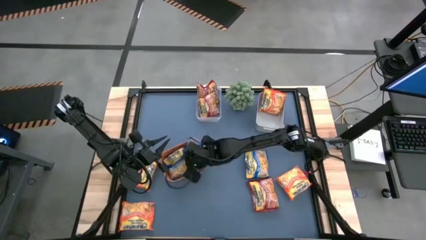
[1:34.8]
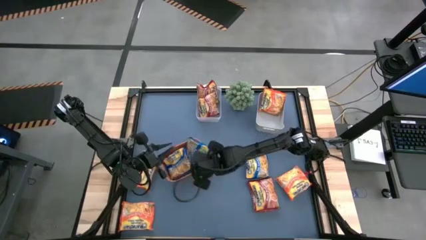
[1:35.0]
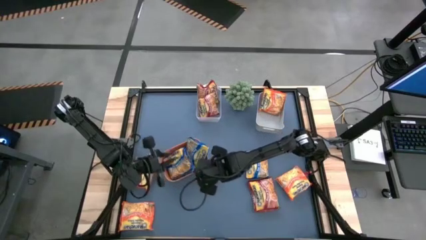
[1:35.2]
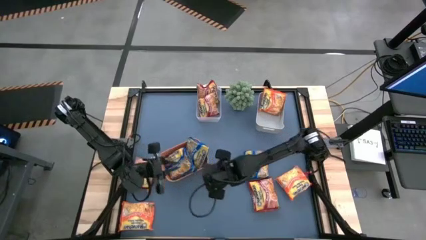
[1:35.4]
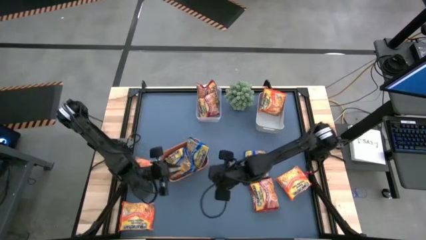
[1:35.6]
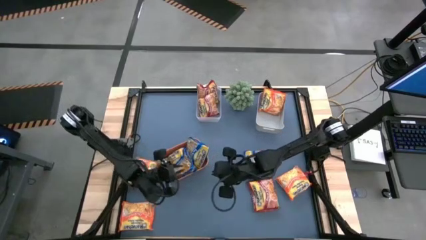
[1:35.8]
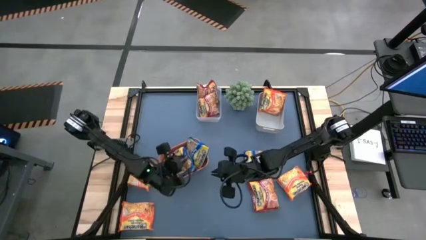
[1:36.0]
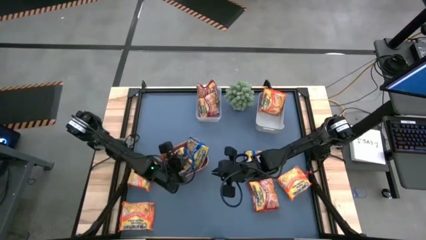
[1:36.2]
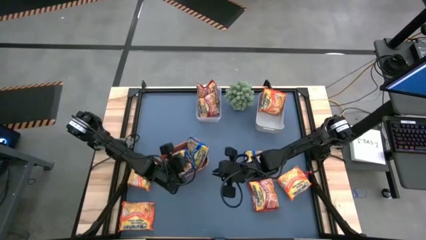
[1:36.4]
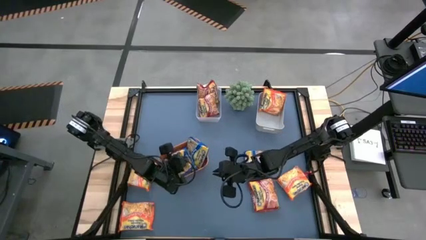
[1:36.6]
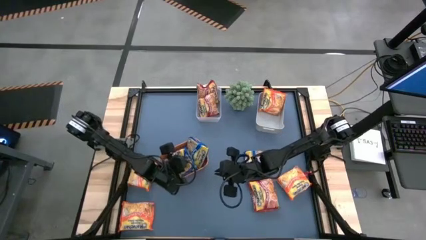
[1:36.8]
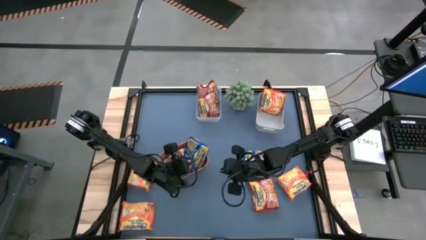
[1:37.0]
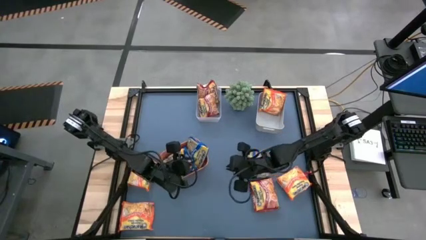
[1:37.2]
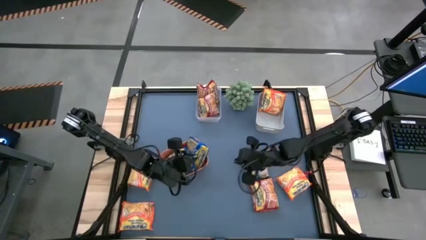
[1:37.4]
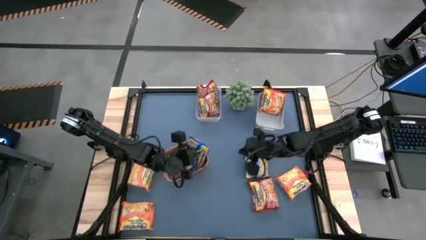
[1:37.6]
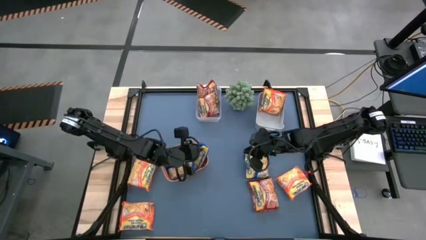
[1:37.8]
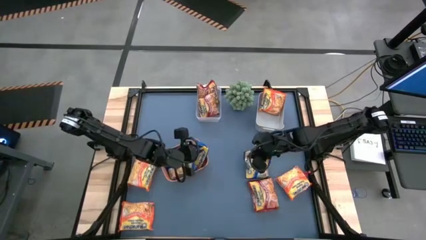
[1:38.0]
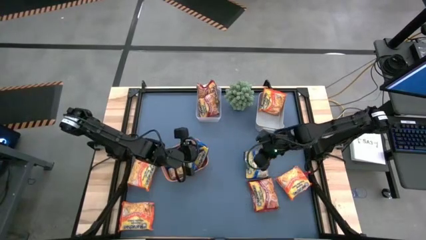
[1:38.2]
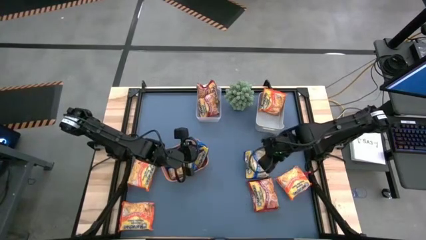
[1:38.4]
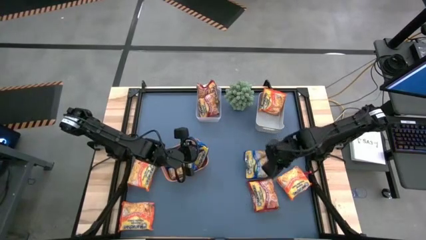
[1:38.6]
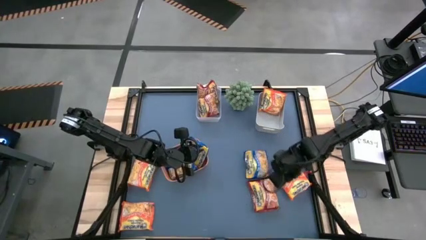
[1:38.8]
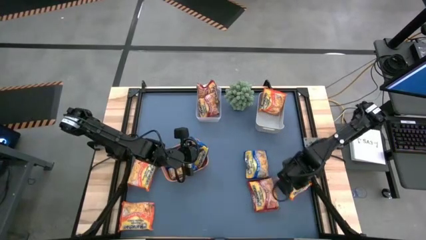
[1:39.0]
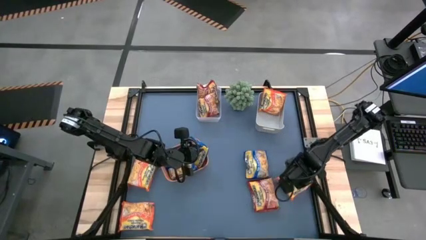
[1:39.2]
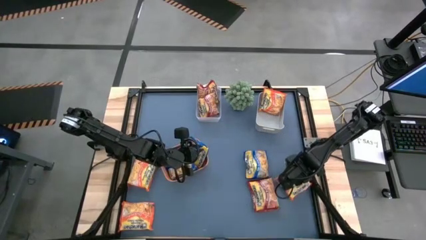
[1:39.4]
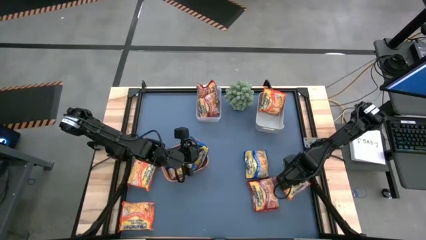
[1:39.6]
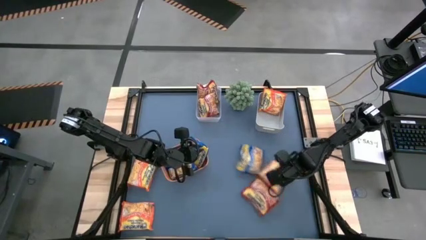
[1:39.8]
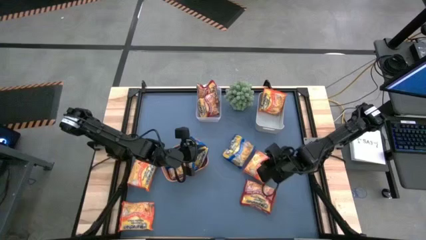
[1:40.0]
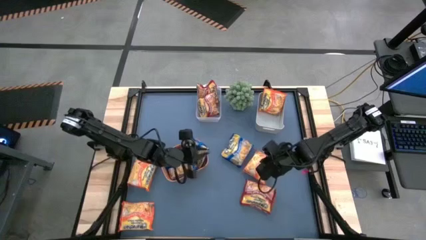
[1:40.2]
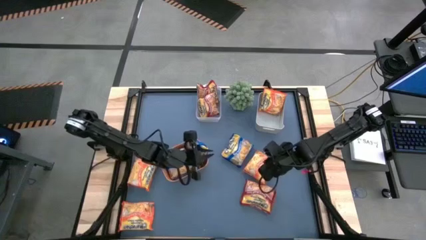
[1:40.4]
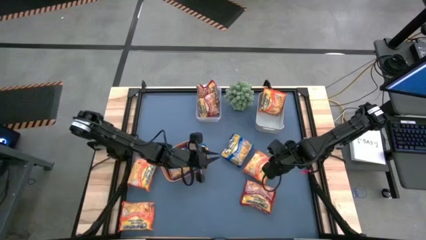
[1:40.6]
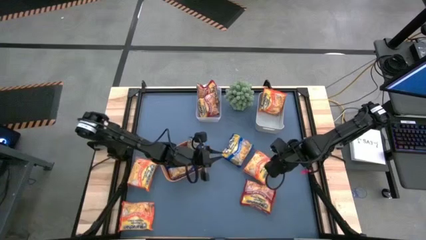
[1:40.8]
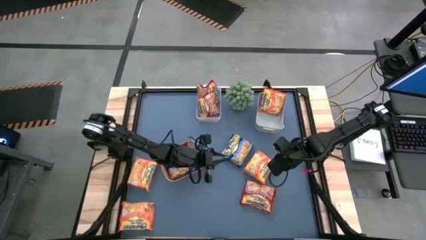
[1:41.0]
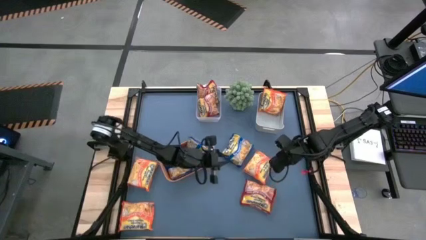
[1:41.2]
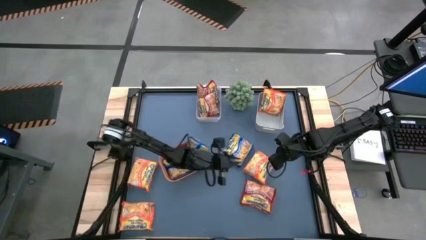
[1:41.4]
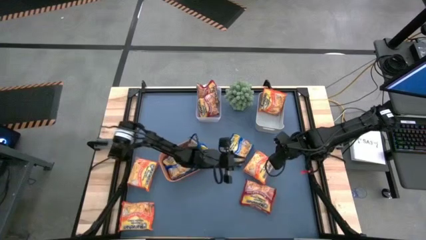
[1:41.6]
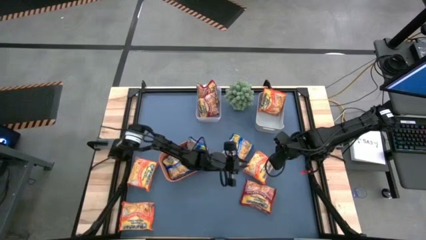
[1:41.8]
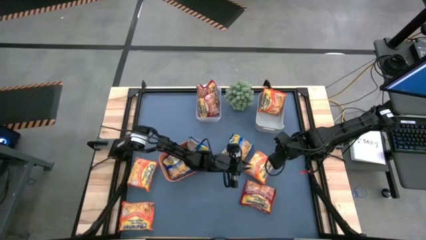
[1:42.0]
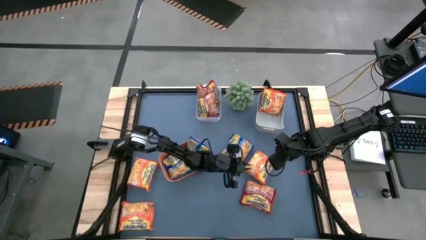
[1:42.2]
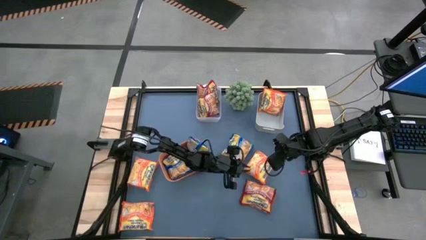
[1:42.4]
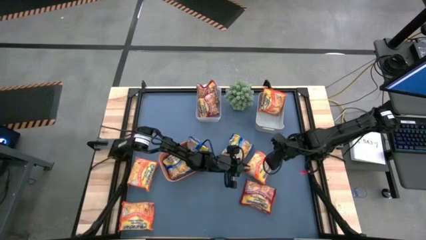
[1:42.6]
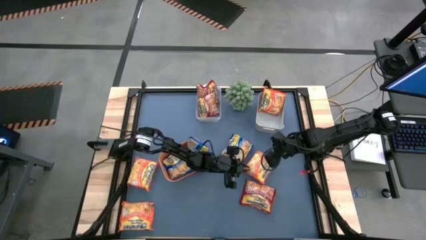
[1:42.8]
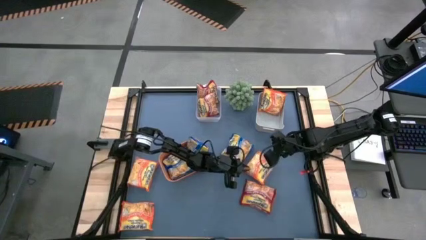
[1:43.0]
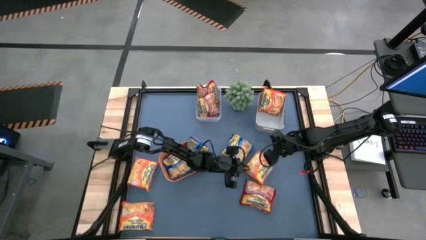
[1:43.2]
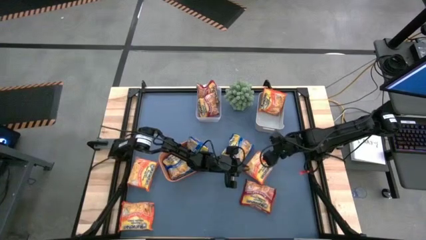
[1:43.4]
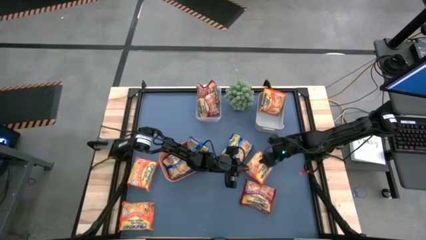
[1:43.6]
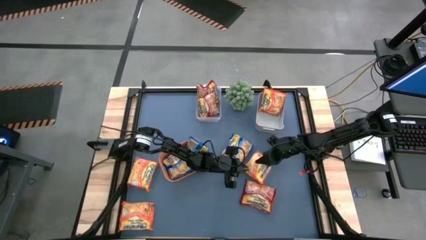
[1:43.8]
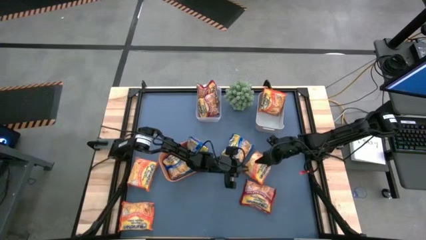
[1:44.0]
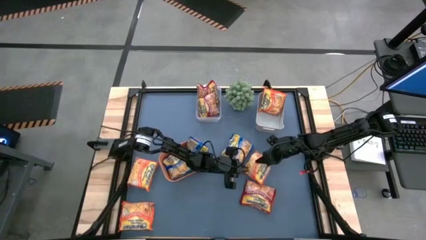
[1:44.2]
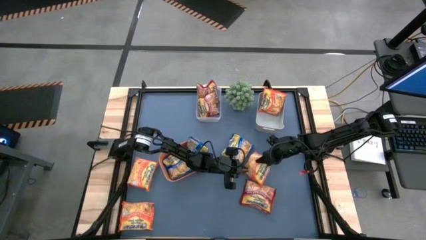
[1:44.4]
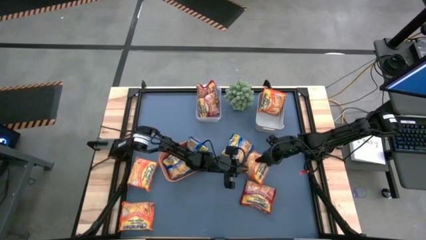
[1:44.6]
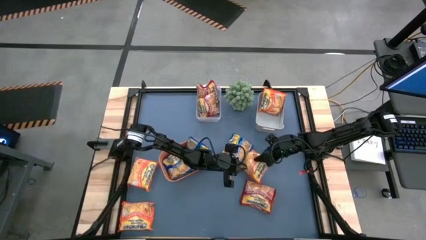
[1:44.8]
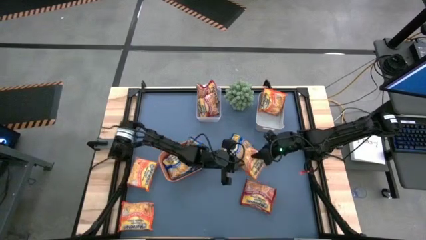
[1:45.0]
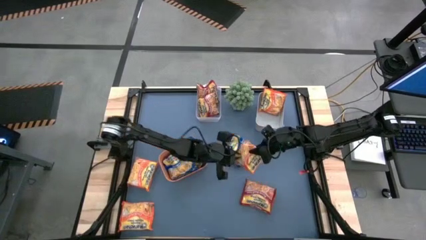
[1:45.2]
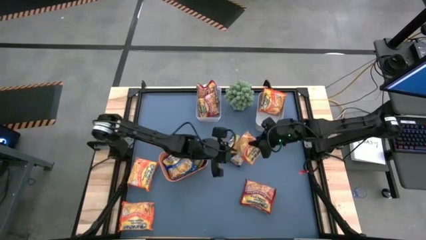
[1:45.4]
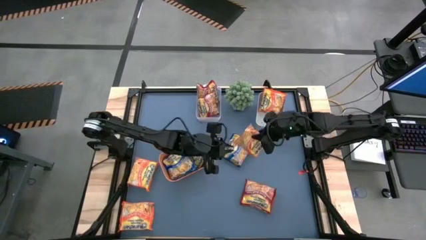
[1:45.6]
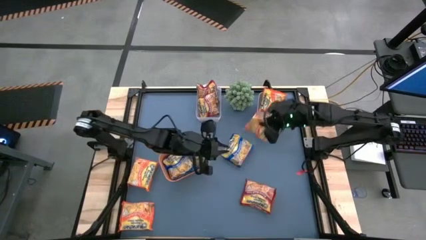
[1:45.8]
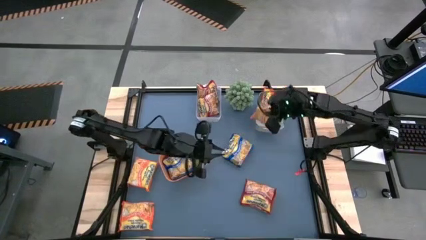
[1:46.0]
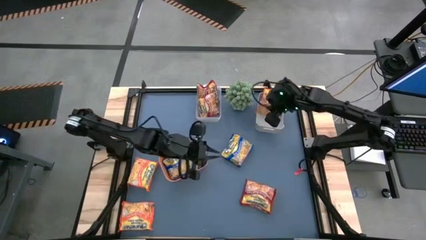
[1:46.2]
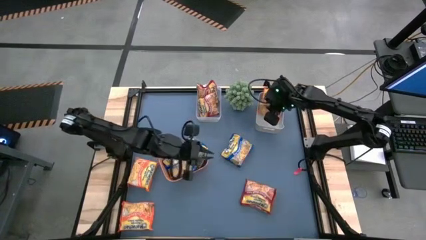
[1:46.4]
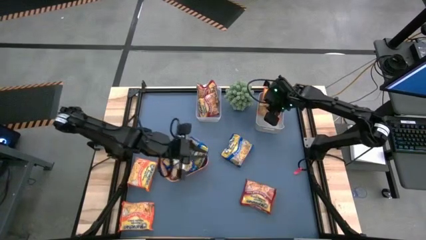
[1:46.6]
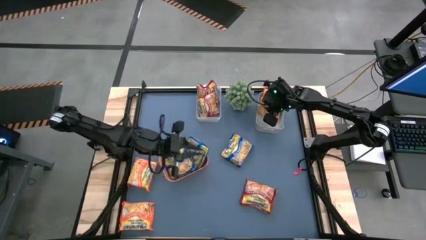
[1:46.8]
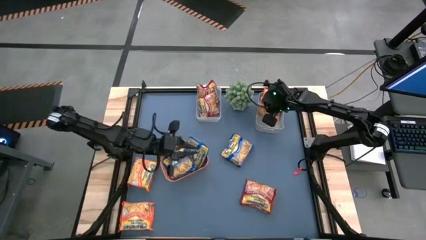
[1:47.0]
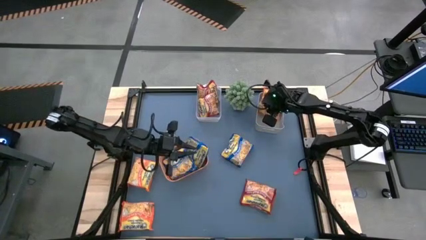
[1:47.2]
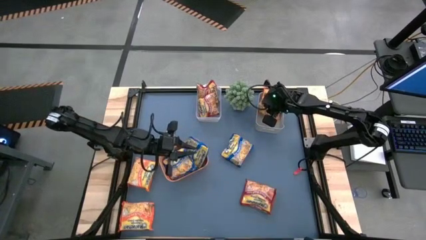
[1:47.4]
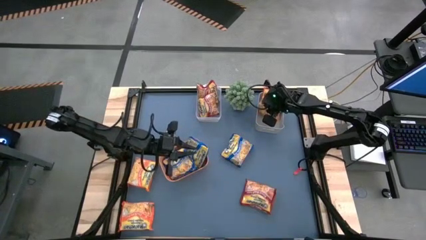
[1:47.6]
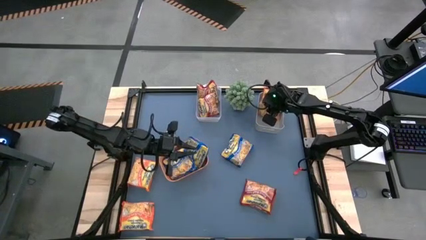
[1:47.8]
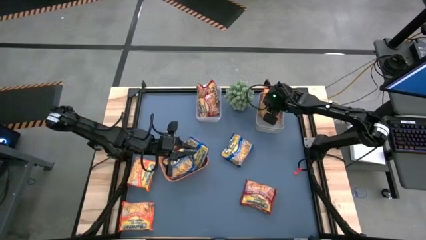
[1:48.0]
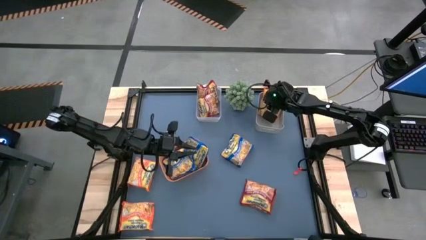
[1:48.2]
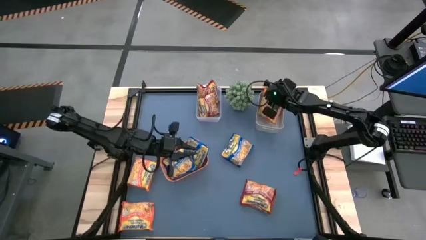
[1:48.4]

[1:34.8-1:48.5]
Task: Sort Maruchan noodles
Put the orange noodle pack into the gray bin

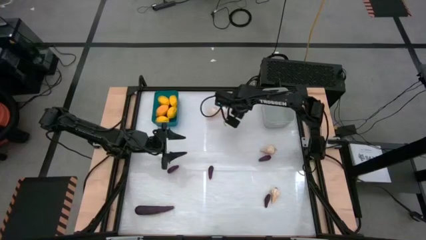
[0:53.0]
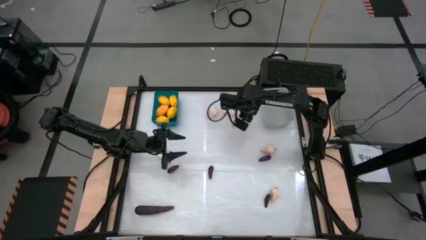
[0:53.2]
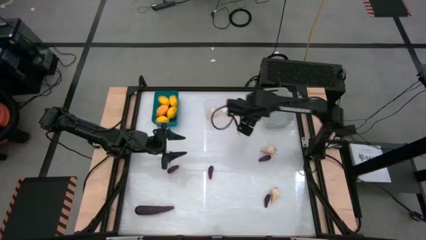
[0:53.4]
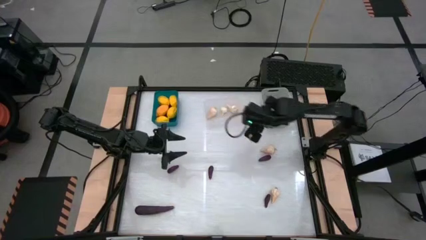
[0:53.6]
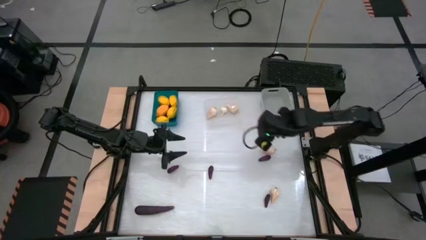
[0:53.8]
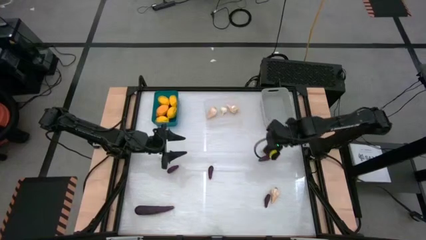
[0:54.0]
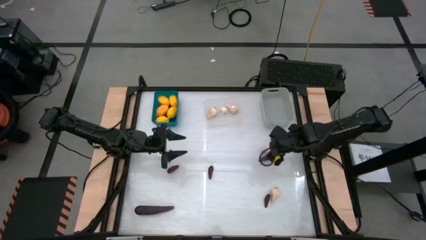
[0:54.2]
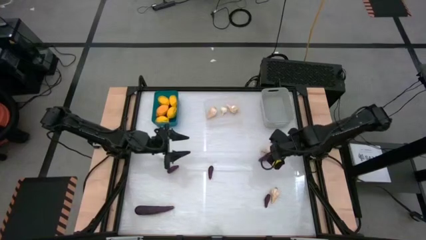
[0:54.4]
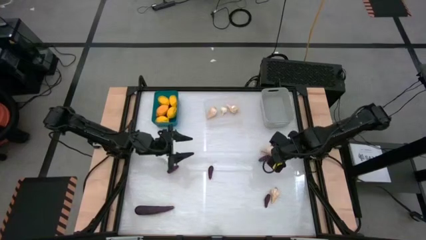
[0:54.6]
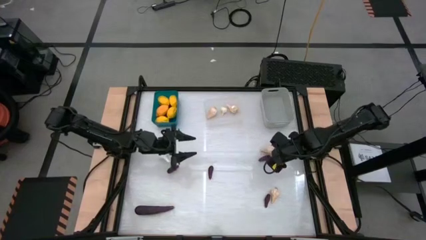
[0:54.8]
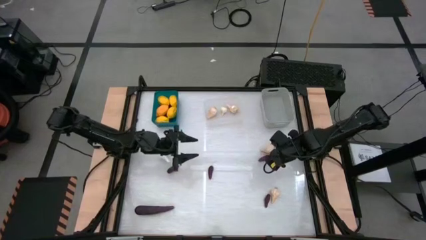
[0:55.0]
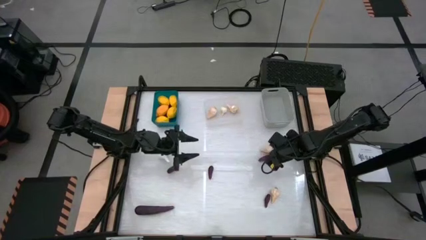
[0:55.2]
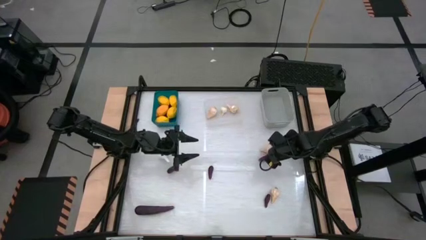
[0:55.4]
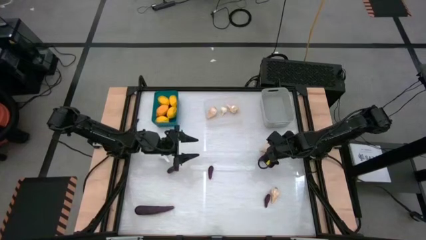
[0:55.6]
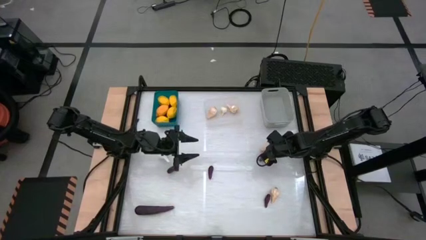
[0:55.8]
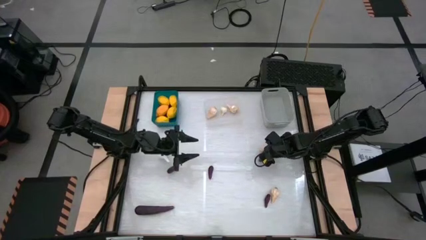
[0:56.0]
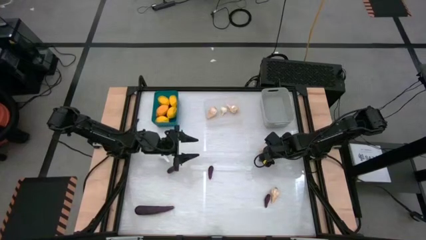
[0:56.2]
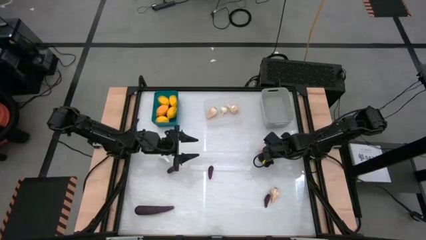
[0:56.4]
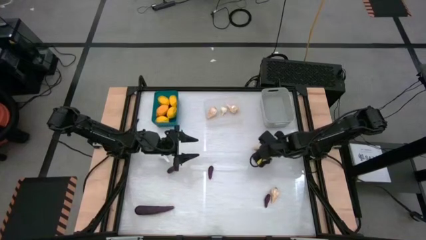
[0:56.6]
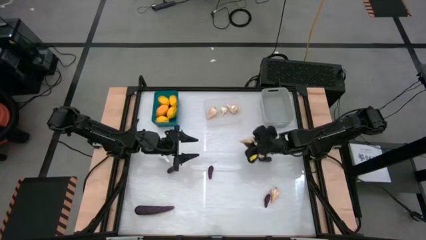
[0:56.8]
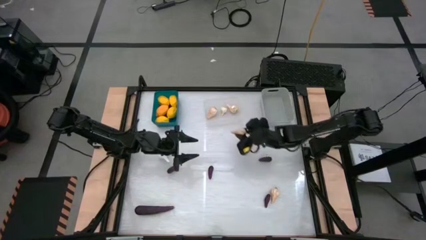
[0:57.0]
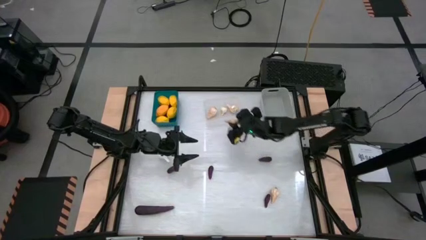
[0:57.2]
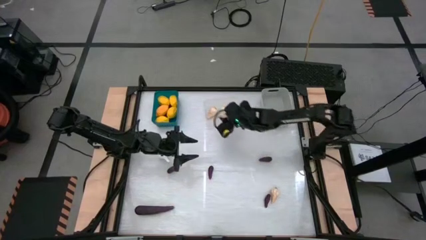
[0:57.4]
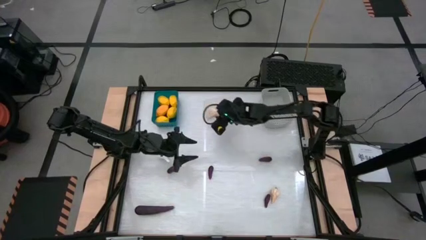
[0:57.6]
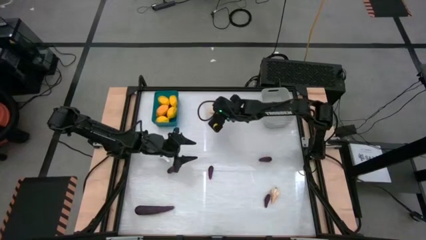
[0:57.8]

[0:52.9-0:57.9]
Task: Sort produce into baskets
Put the garlic into the transparent bin
